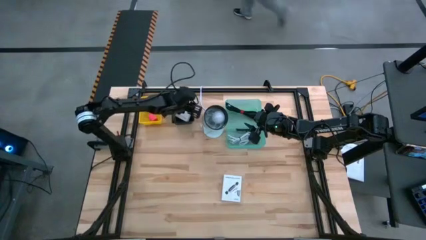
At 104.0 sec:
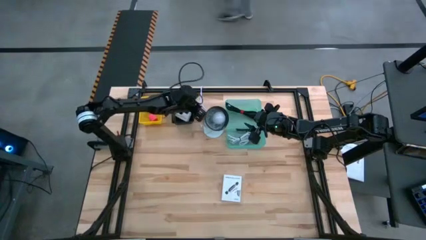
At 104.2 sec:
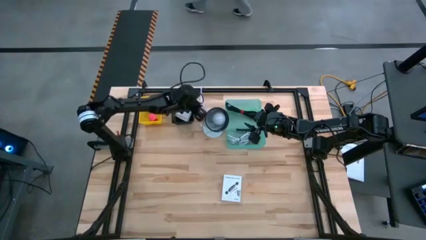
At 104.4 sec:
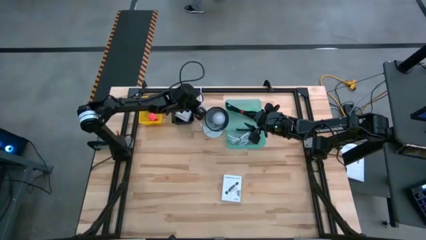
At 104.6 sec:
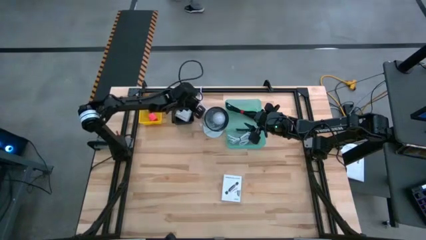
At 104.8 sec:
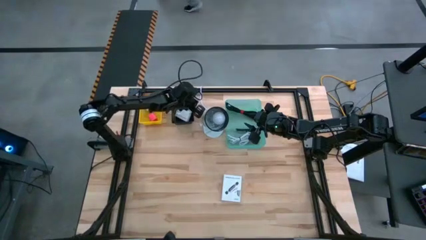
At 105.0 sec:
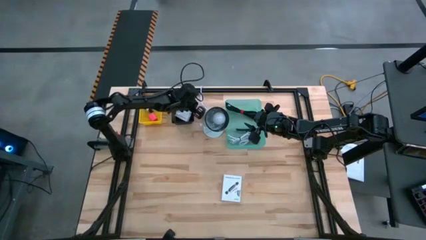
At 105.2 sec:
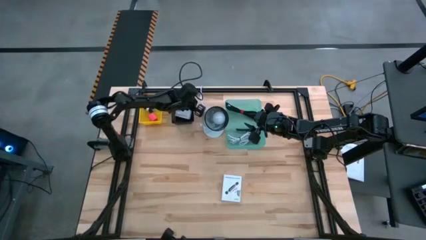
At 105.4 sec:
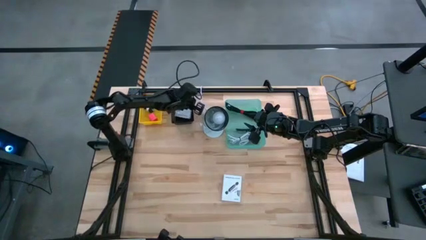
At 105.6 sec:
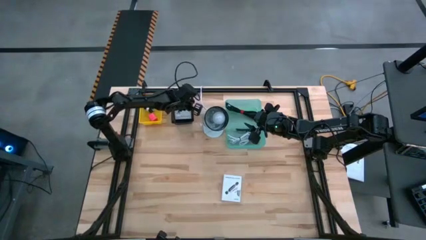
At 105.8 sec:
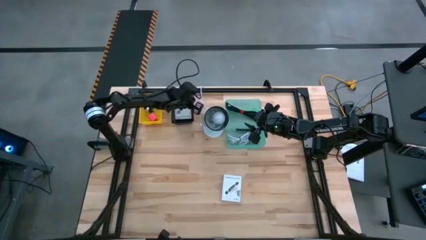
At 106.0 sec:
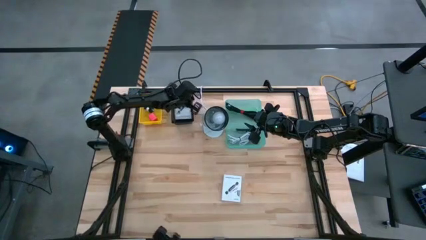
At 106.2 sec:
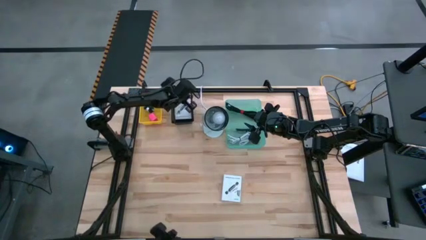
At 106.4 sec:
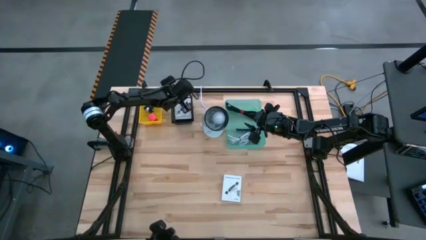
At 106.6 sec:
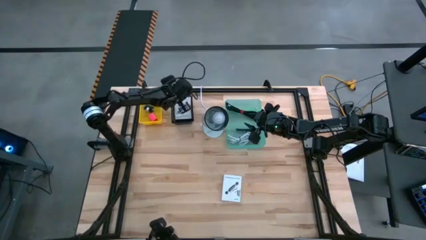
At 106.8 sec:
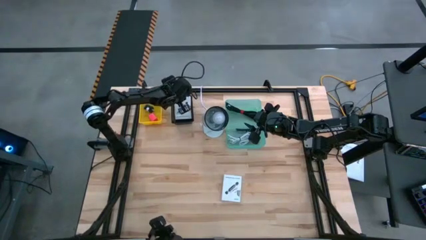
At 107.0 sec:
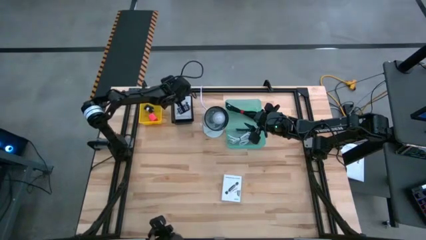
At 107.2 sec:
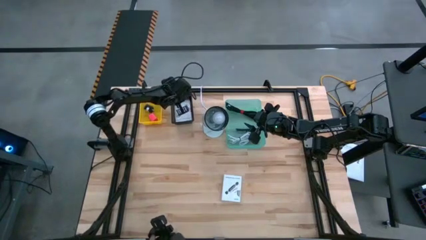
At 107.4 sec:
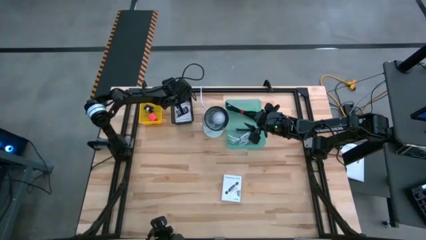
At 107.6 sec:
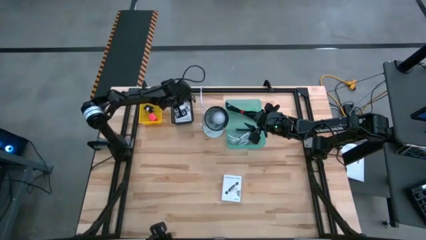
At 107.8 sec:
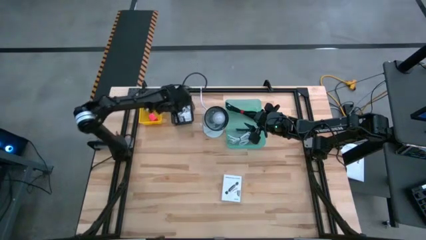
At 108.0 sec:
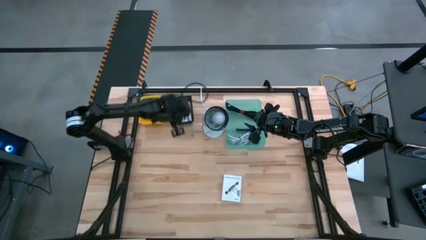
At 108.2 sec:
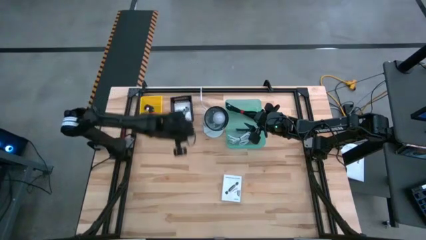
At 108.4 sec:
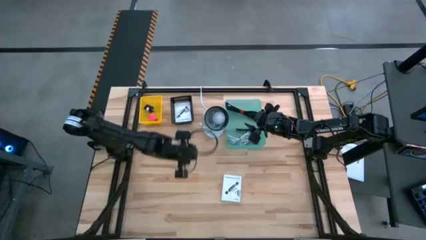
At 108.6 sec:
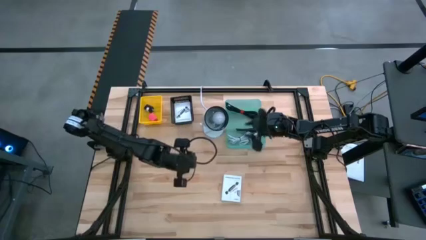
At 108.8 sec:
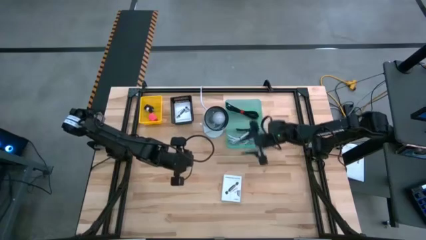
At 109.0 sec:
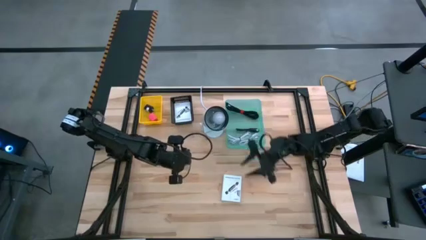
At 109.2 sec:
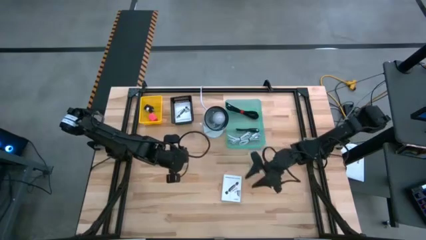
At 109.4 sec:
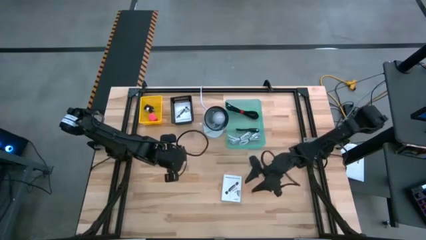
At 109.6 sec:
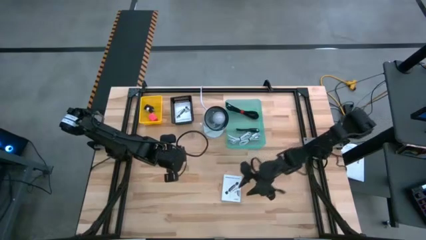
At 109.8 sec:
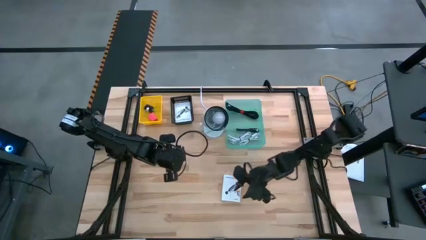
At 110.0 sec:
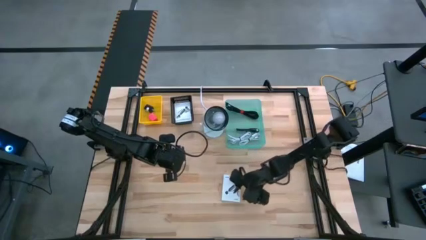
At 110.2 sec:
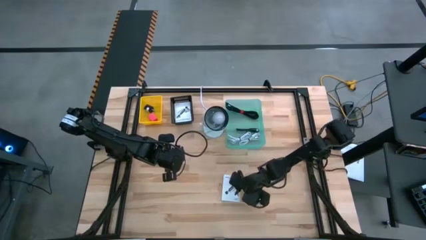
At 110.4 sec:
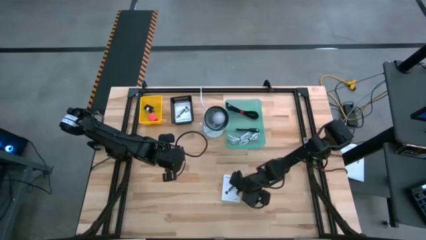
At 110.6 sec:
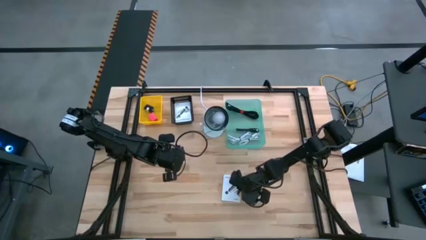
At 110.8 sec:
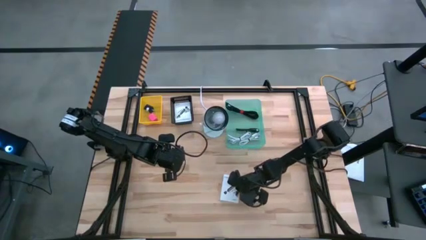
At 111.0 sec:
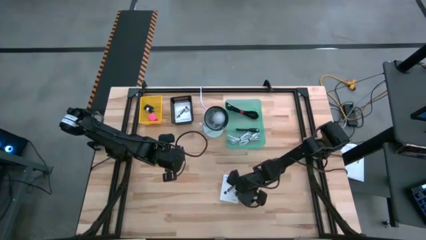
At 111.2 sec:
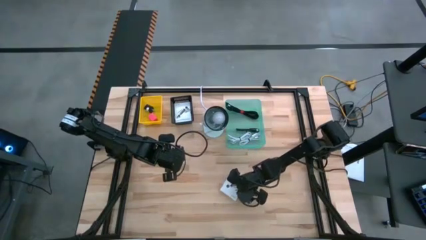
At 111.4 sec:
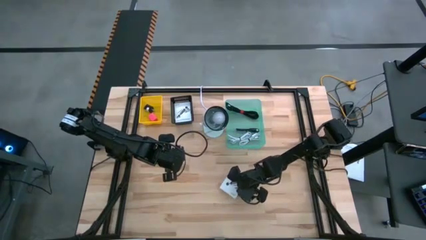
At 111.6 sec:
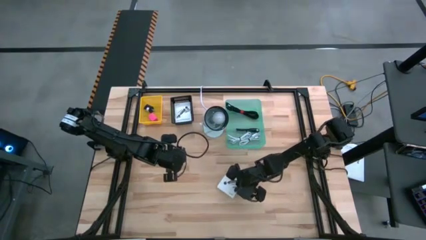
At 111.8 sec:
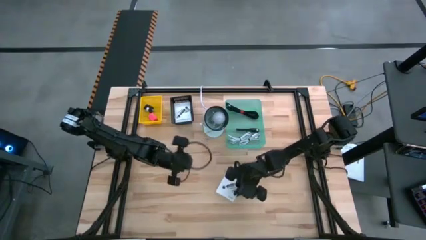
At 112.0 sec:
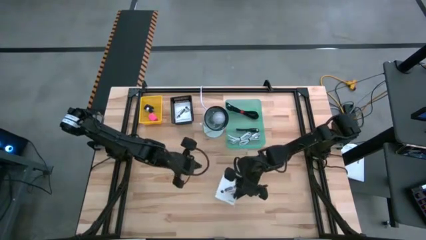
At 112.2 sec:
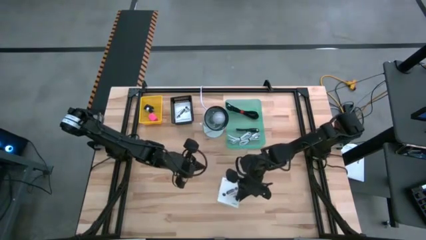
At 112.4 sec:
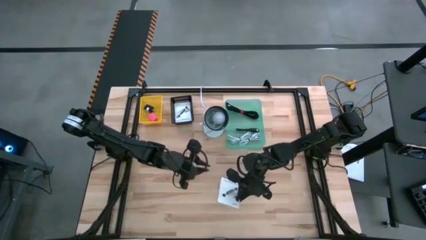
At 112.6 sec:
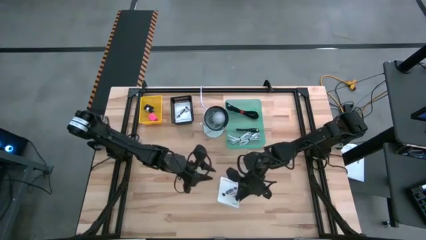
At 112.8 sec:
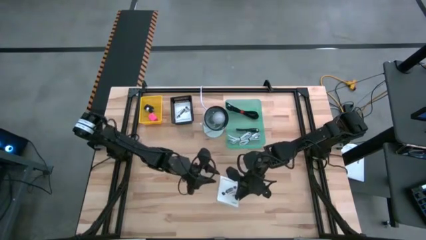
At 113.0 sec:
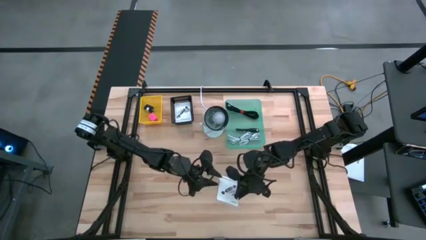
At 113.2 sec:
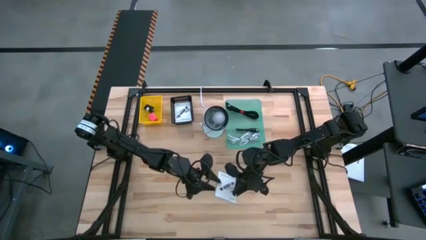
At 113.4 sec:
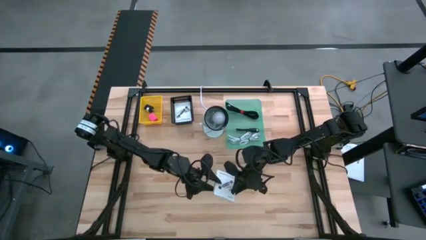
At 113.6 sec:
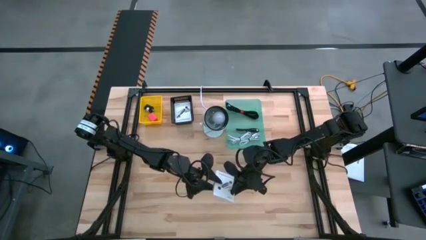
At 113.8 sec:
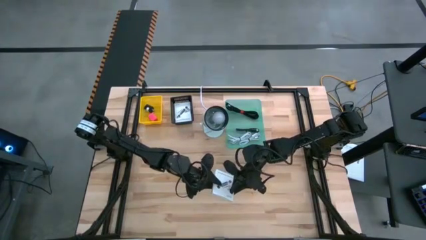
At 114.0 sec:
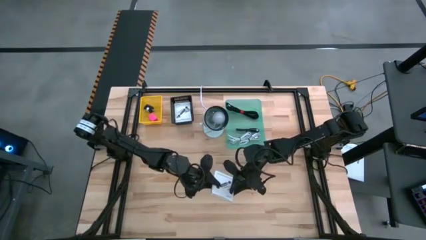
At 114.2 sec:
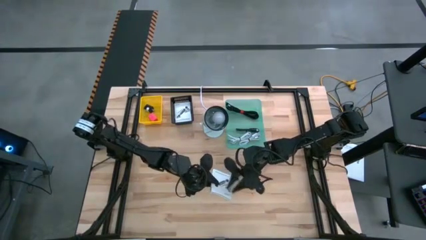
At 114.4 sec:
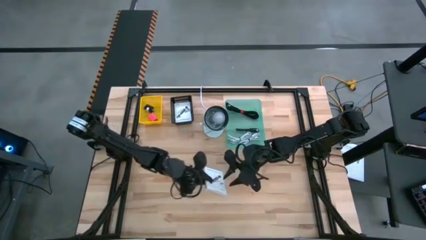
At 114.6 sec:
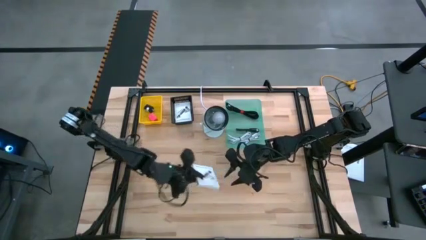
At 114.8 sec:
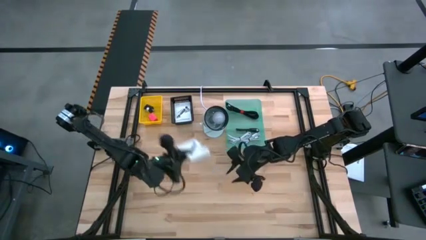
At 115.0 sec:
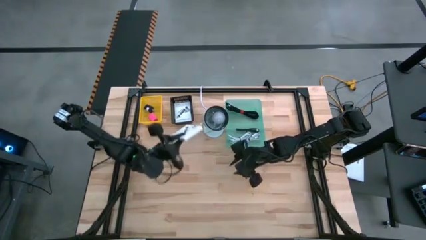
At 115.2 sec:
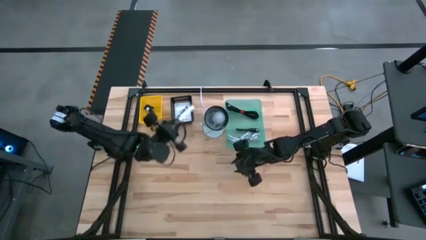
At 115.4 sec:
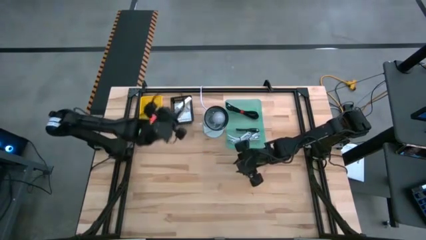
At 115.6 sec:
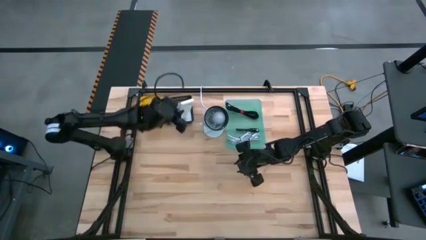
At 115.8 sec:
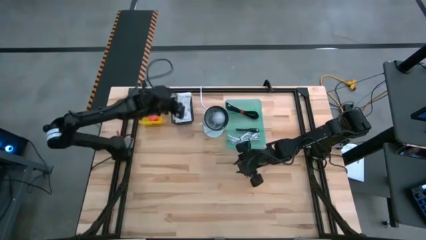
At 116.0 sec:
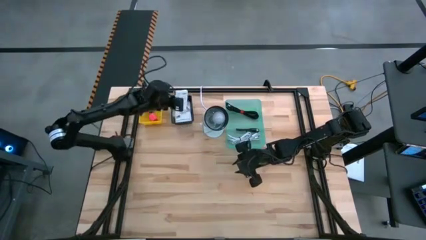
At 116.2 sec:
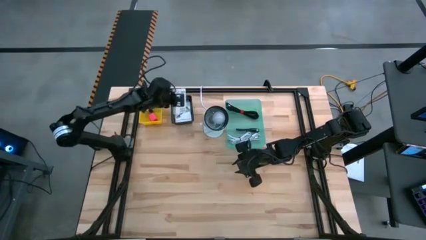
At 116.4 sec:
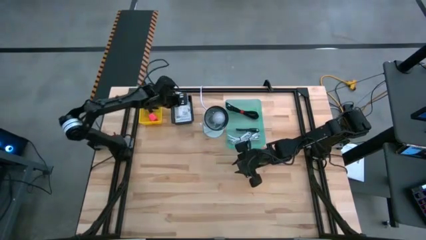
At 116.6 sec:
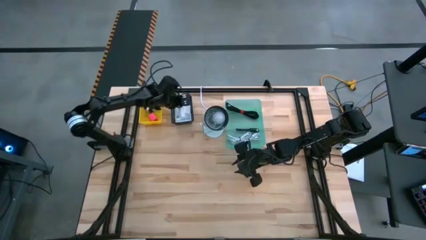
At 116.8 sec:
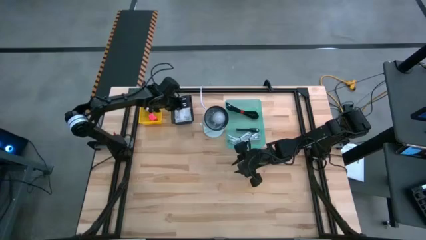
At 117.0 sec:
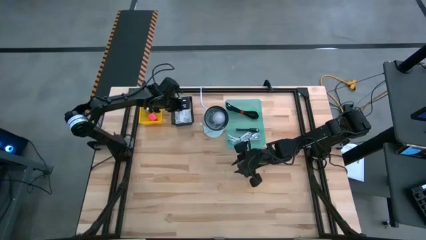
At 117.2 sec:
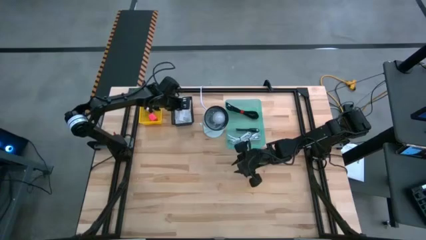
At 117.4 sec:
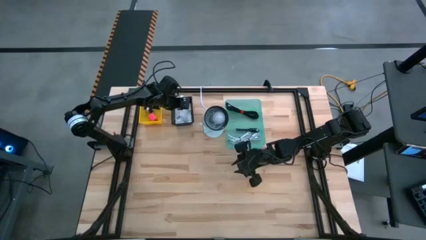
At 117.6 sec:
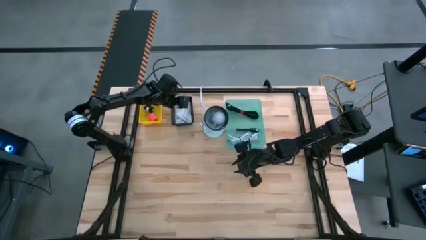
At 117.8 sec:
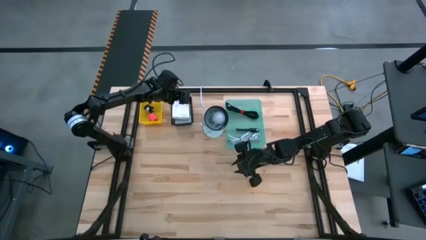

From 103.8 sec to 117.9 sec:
Task: Pick and place items into bin
Put the card reader box into the black bin
